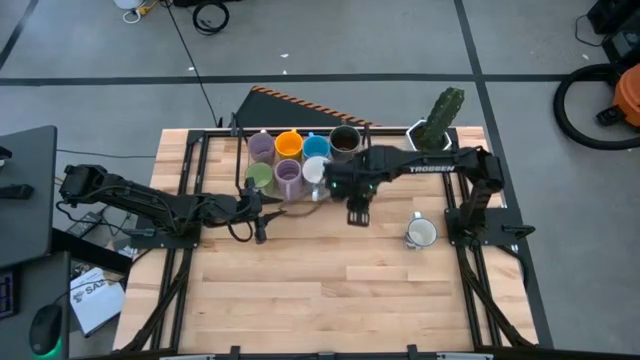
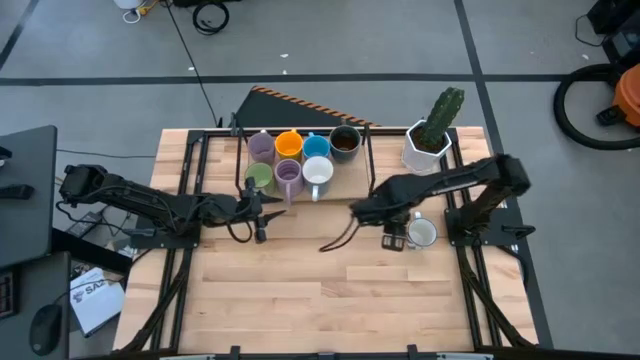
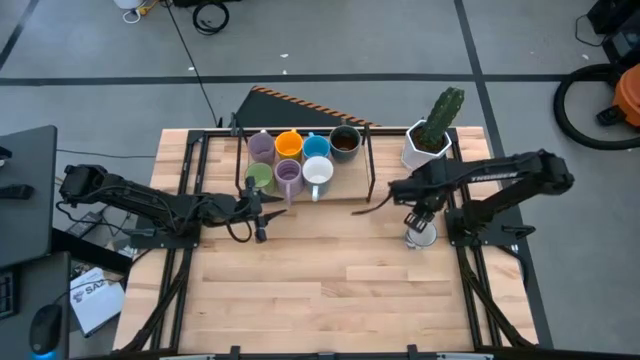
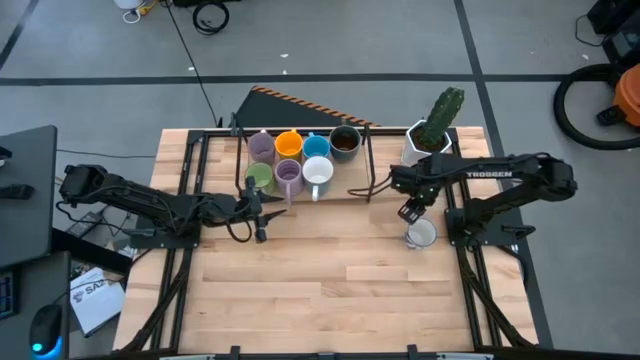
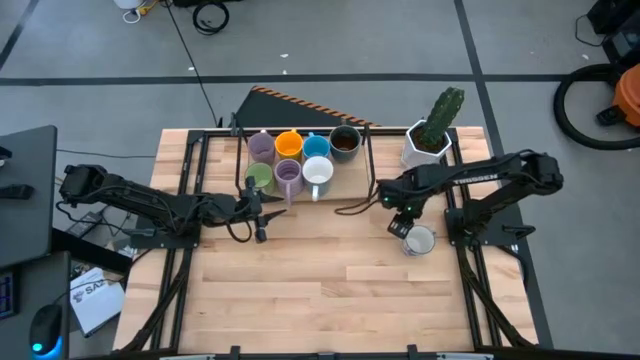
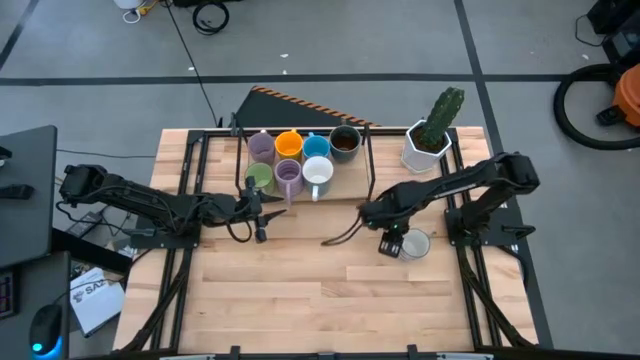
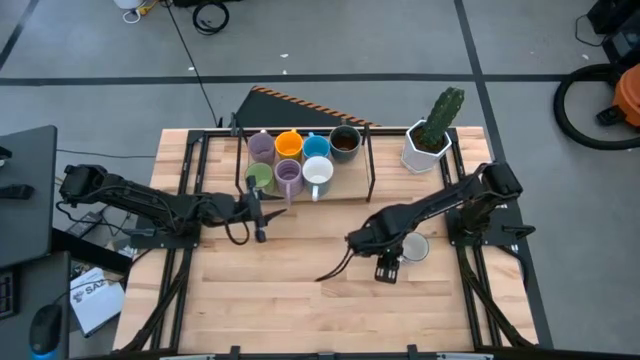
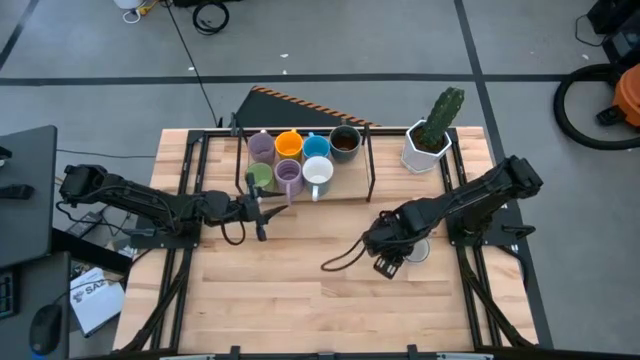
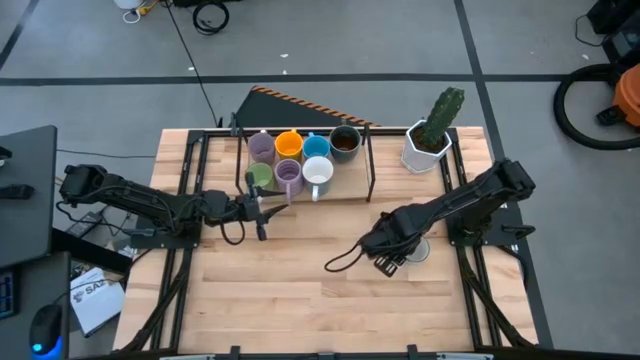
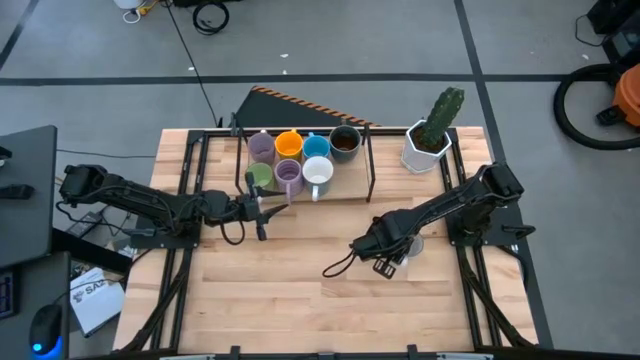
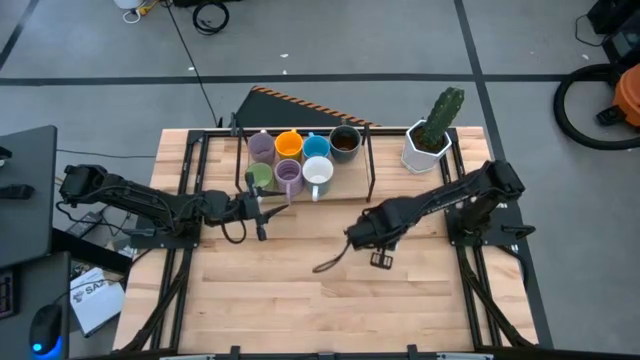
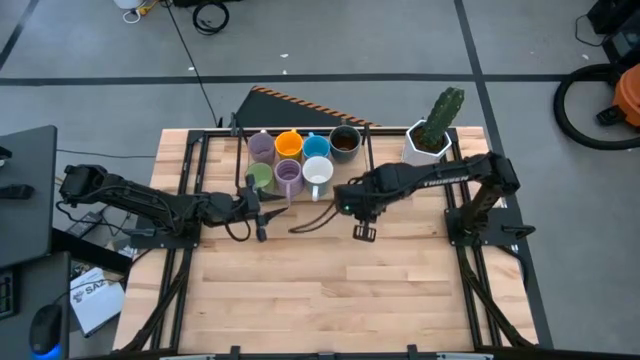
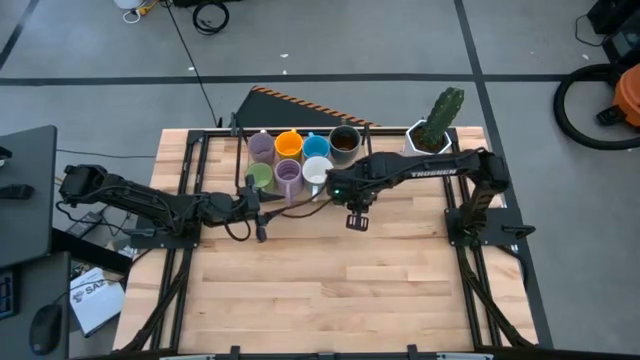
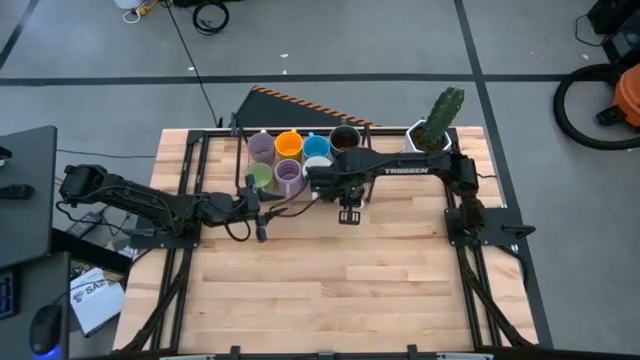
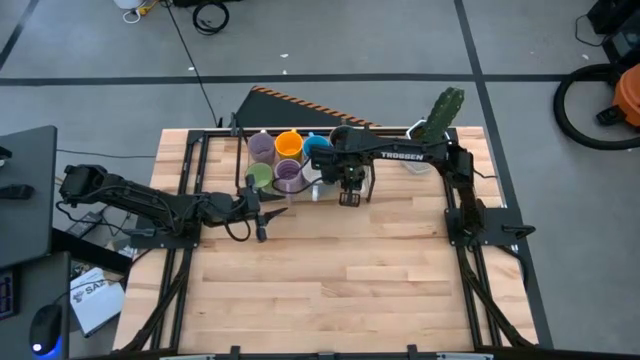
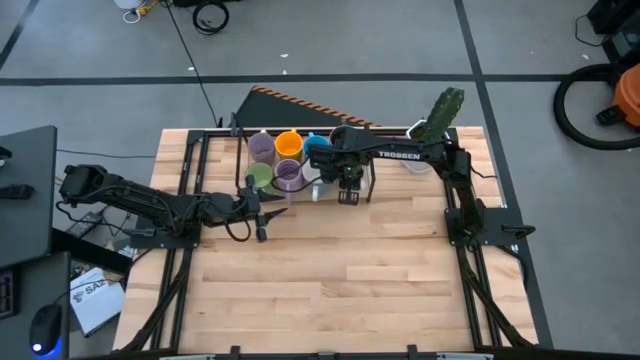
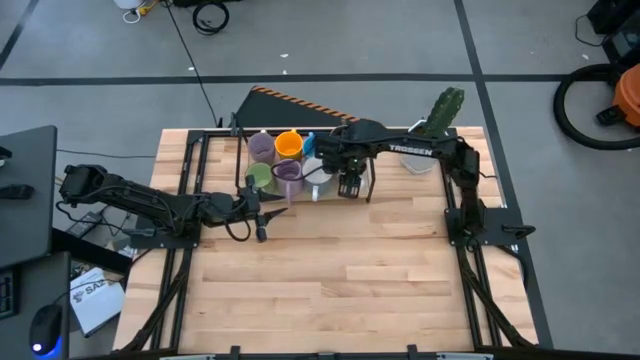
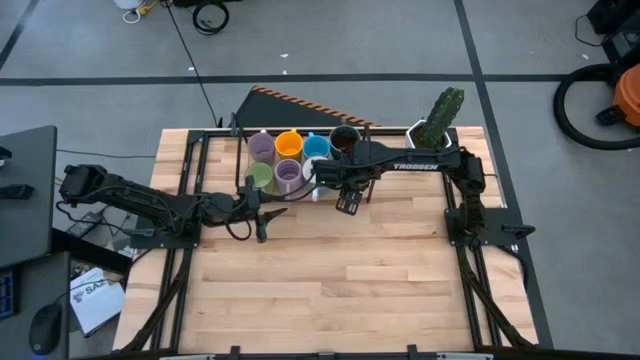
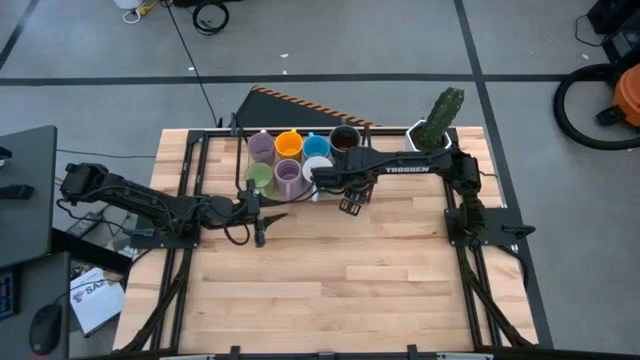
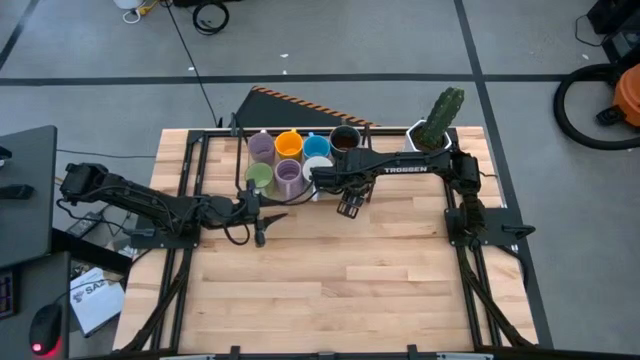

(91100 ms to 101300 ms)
Task: Place coffee mugs
Put the blue white mug on the shelf

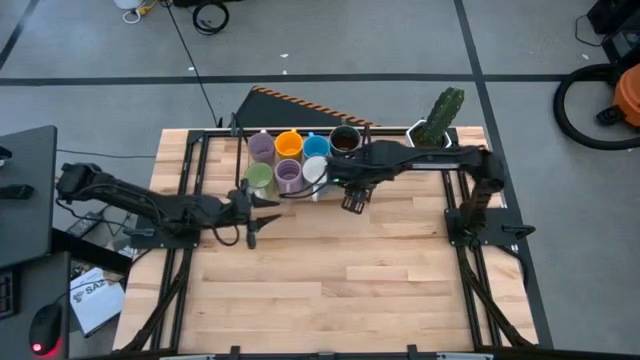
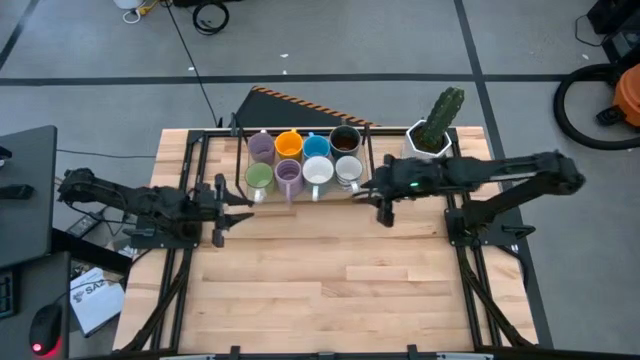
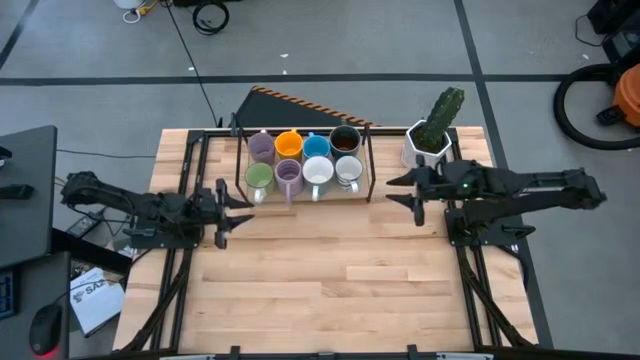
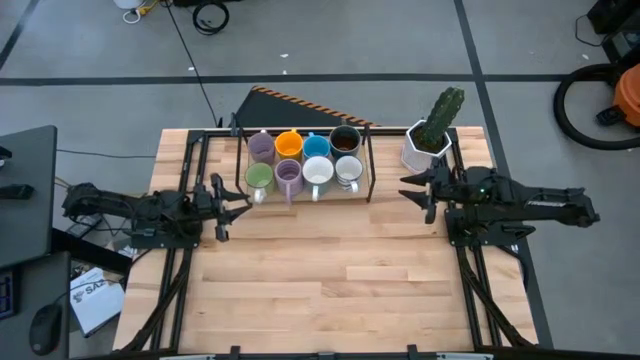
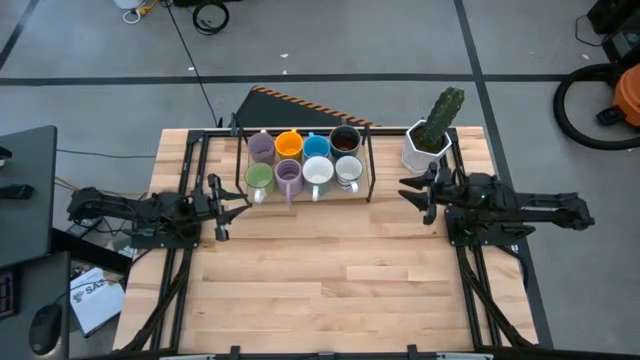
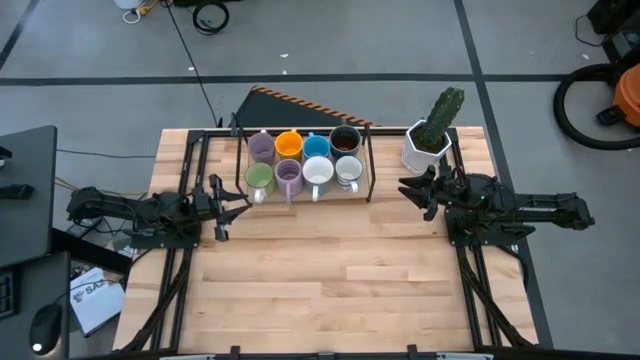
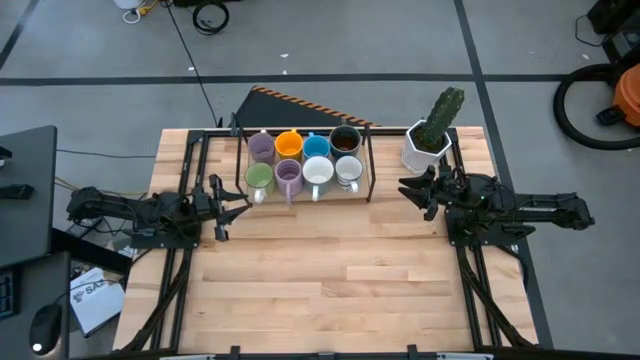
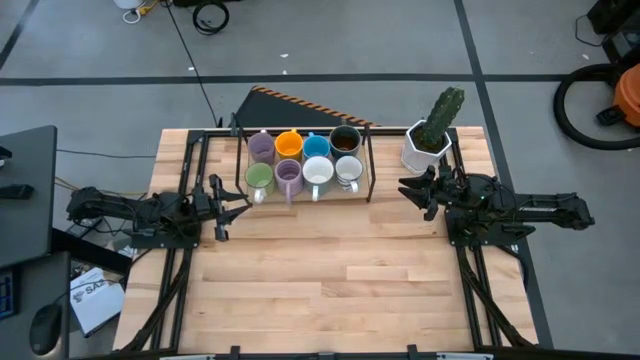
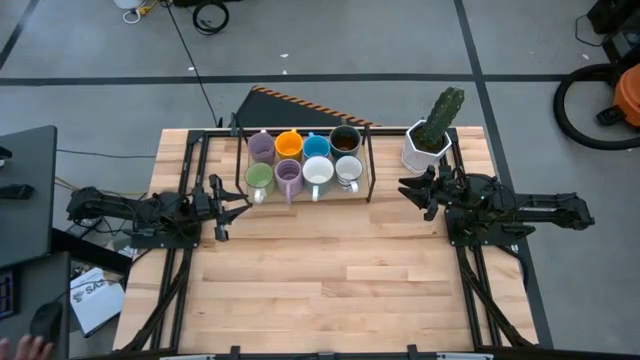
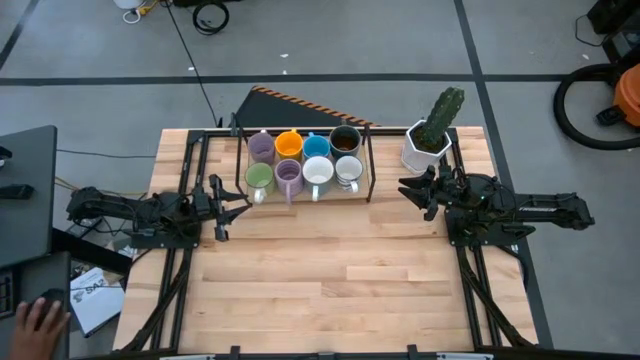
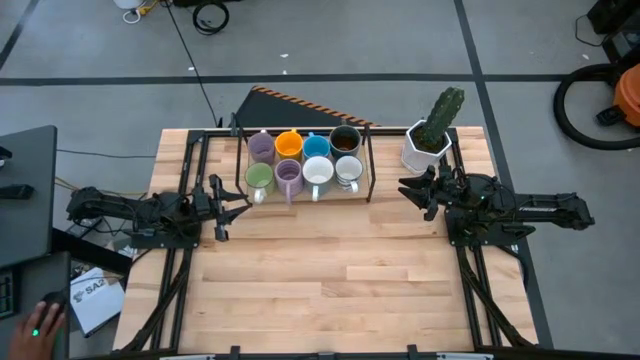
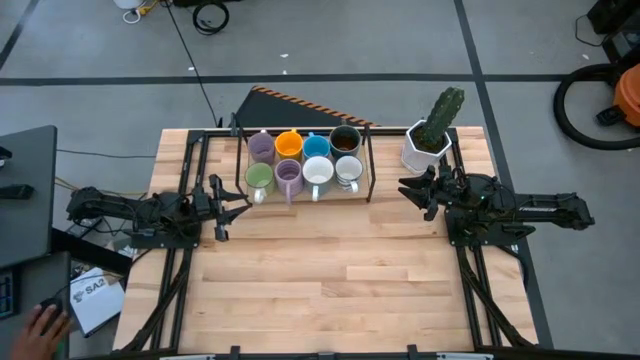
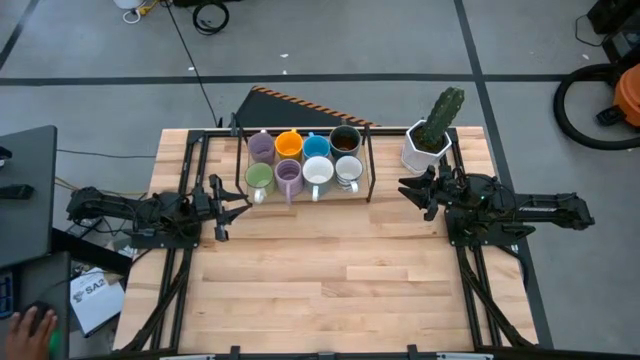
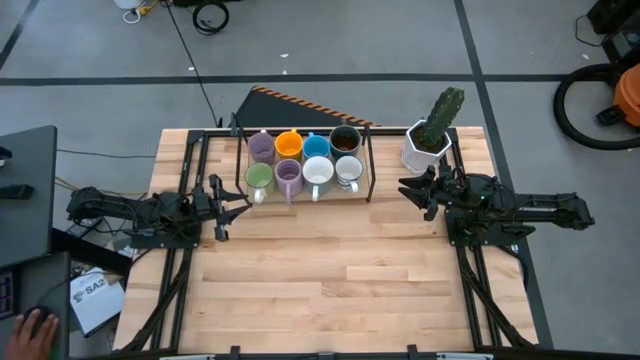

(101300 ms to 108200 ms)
Return to Home Position

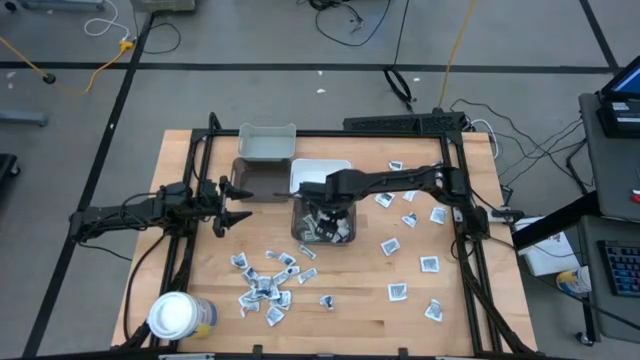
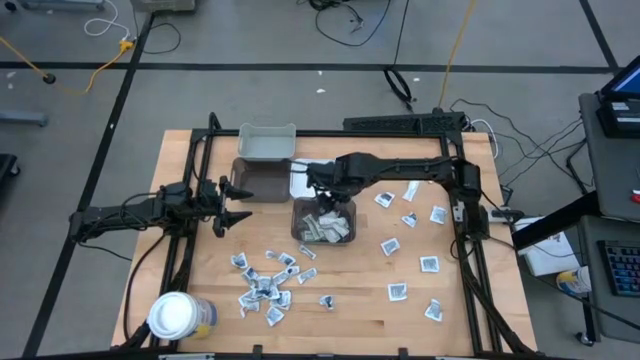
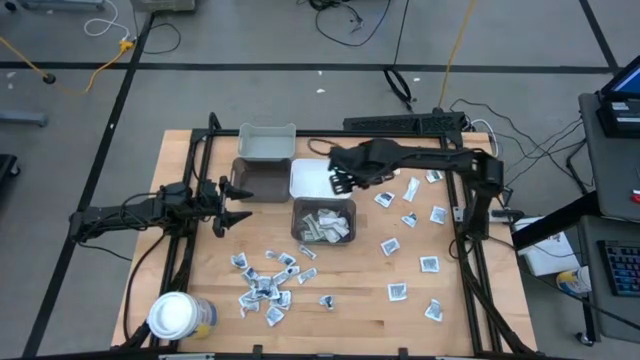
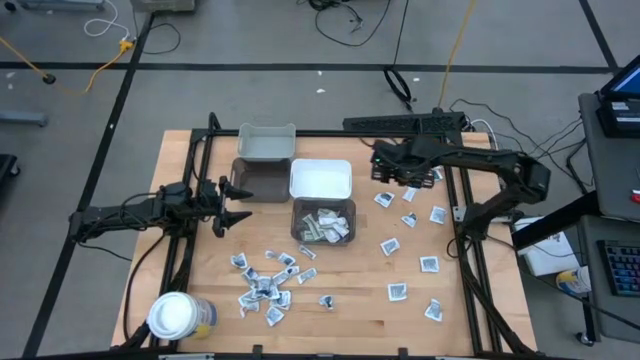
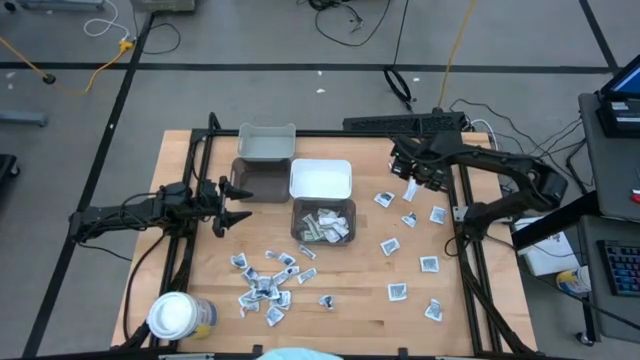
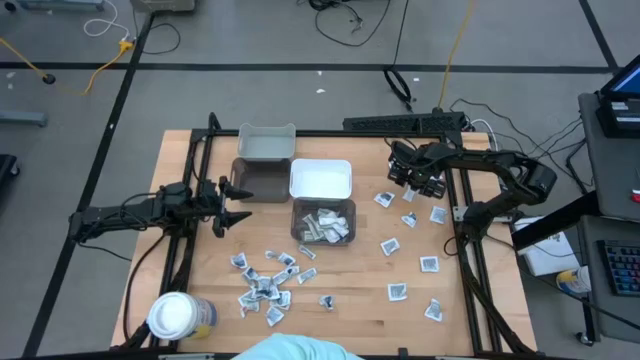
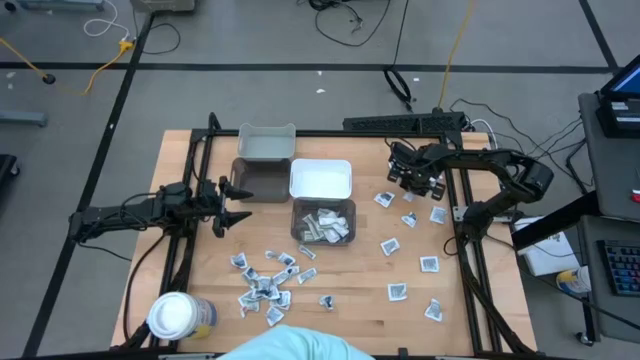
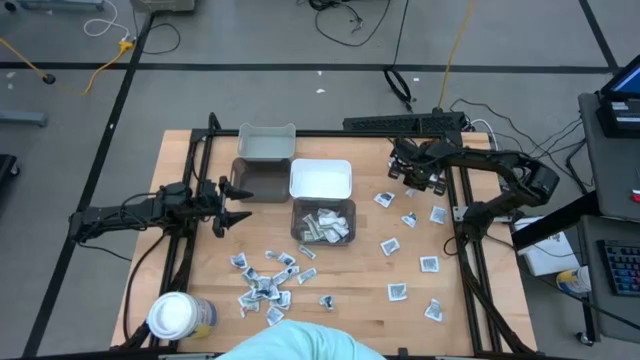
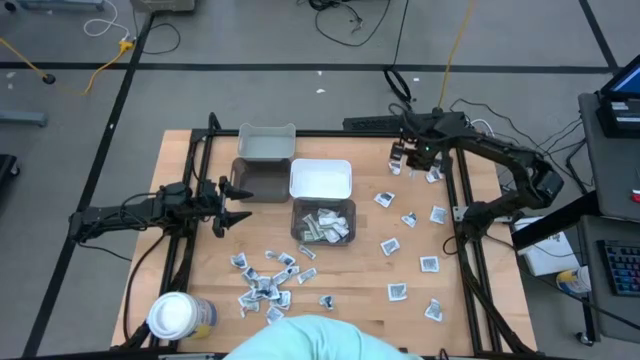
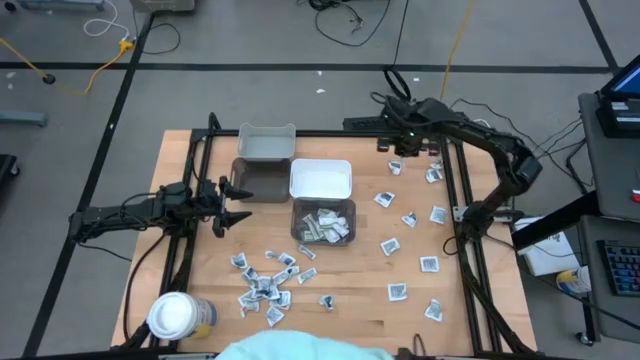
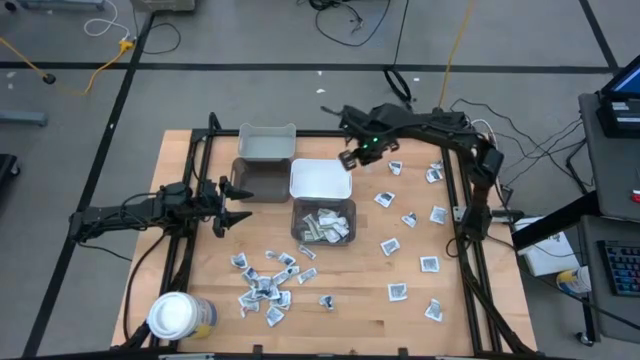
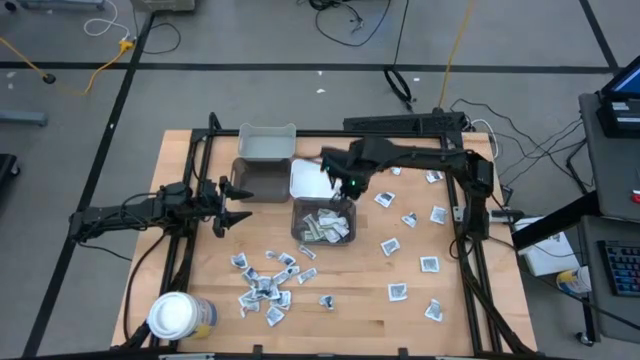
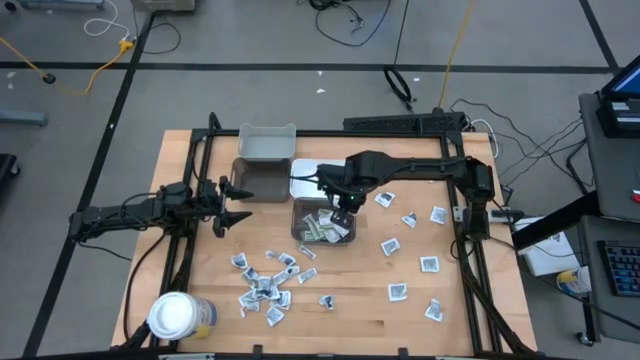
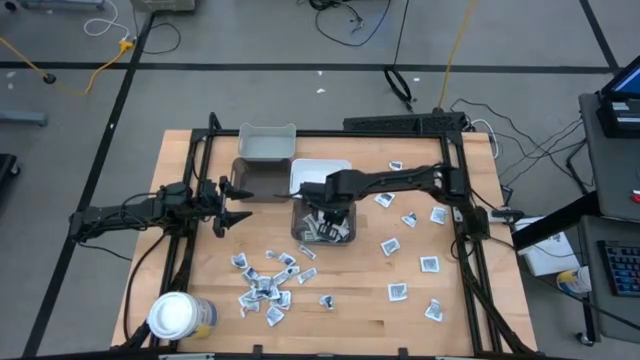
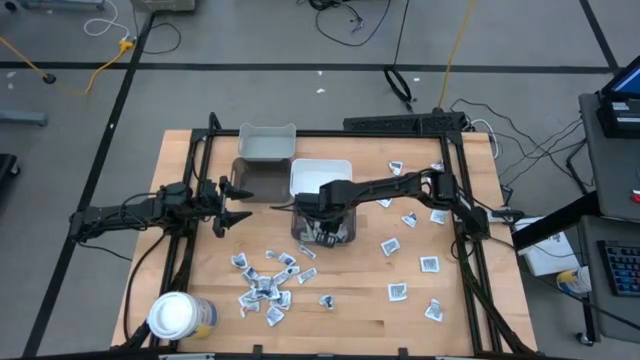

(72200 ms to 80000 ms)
Task: Pick & Place First Aid Supplies
Put the green bandage pack into the right black bin
